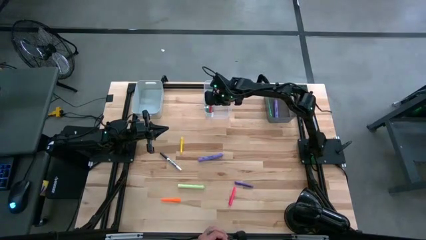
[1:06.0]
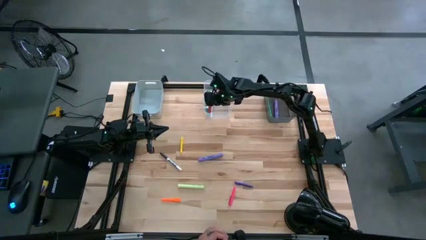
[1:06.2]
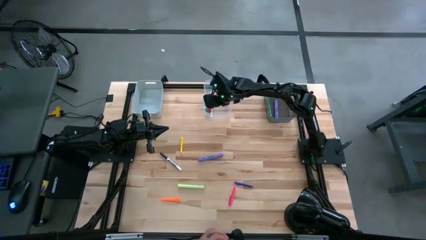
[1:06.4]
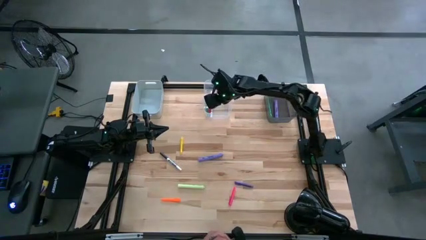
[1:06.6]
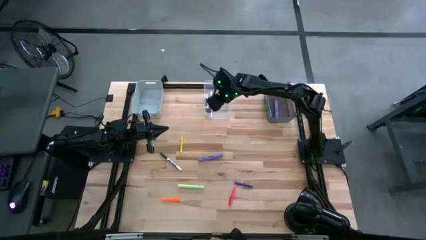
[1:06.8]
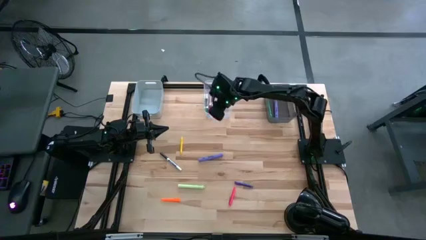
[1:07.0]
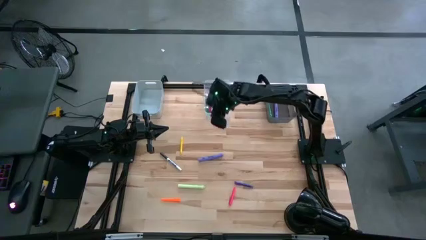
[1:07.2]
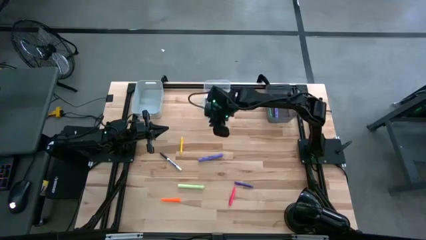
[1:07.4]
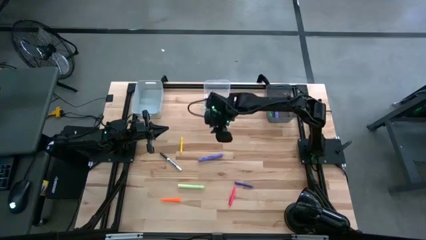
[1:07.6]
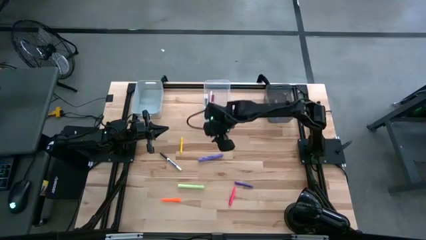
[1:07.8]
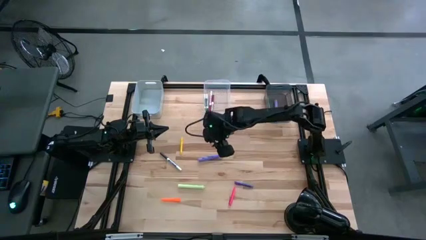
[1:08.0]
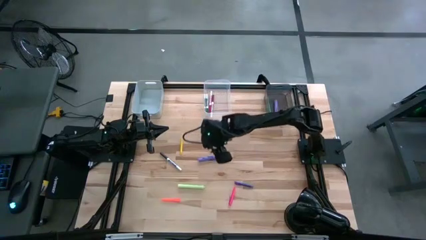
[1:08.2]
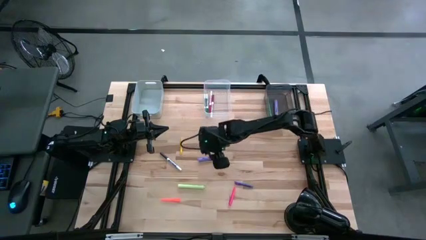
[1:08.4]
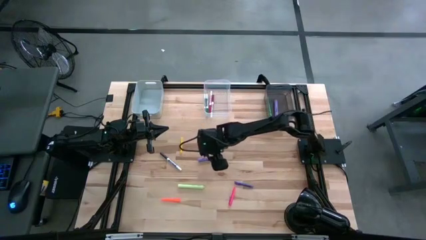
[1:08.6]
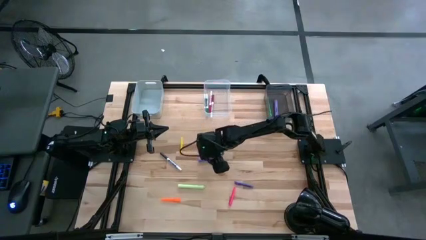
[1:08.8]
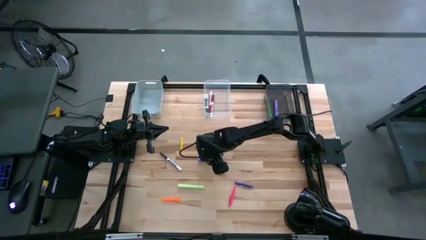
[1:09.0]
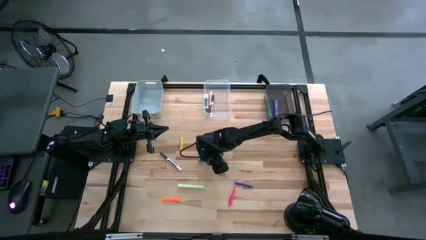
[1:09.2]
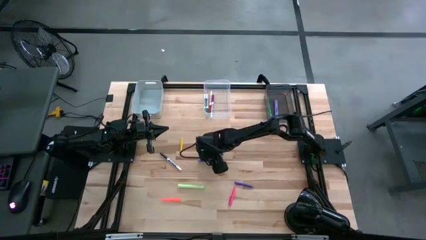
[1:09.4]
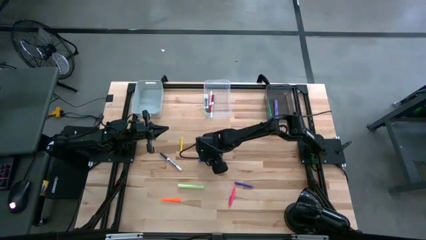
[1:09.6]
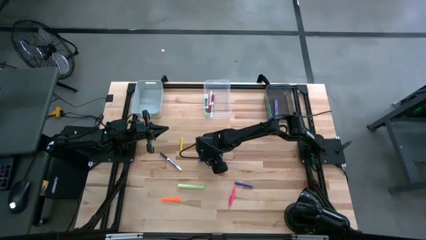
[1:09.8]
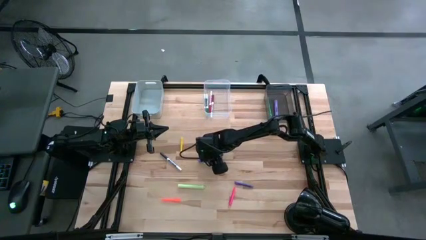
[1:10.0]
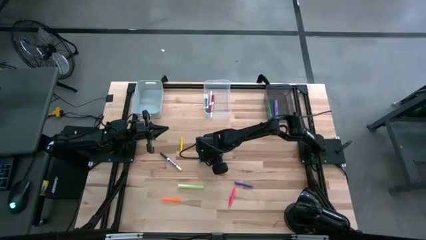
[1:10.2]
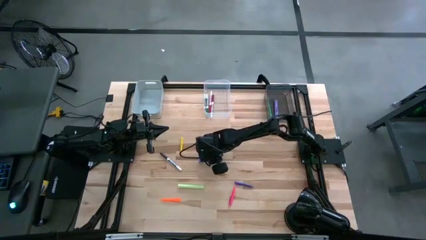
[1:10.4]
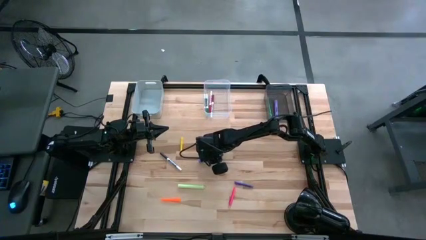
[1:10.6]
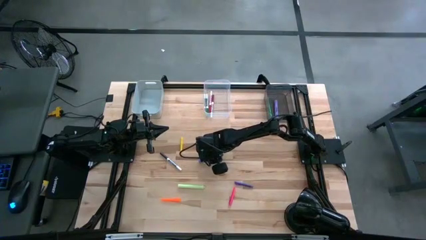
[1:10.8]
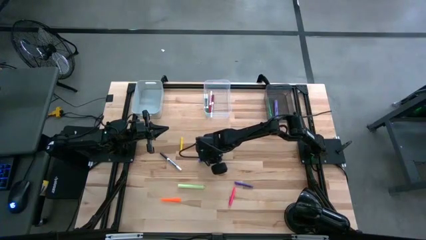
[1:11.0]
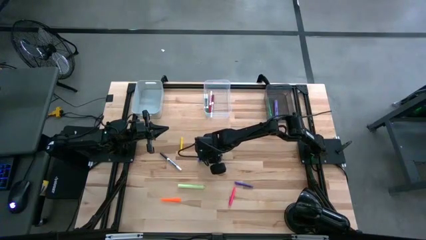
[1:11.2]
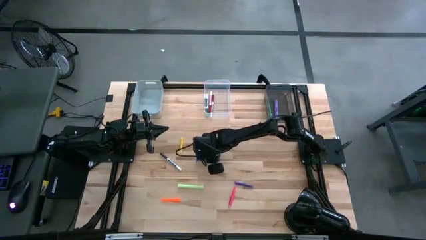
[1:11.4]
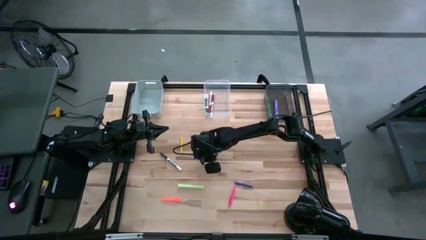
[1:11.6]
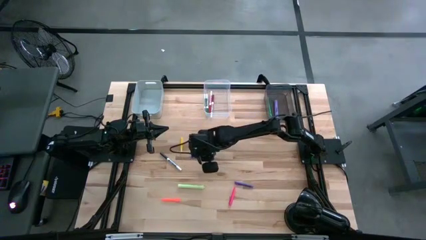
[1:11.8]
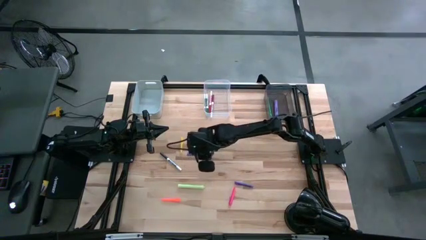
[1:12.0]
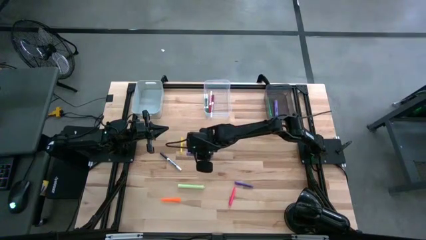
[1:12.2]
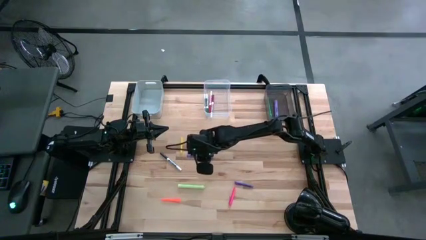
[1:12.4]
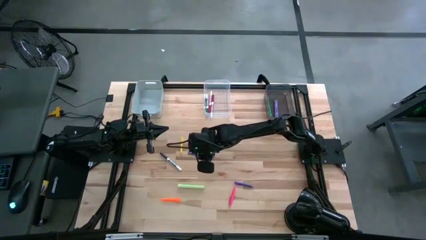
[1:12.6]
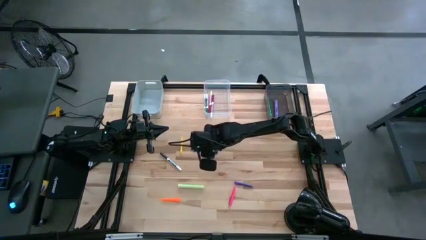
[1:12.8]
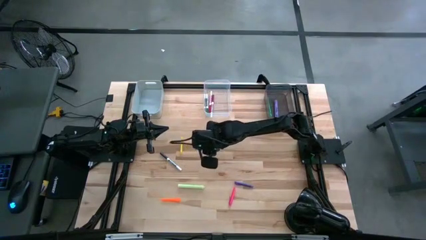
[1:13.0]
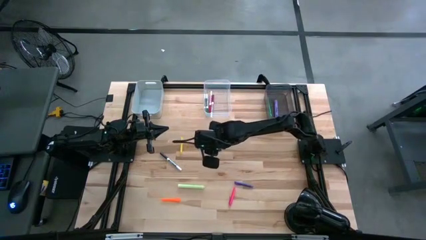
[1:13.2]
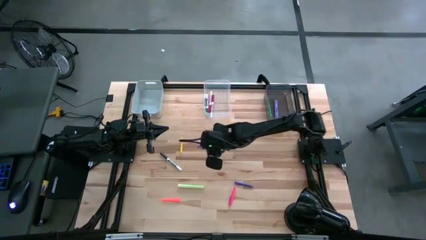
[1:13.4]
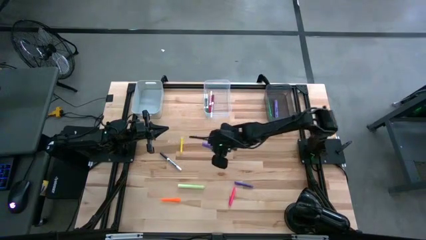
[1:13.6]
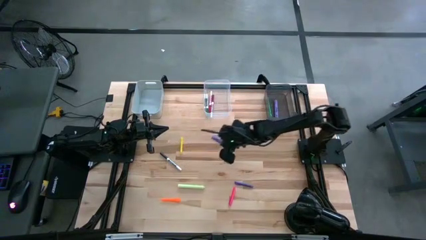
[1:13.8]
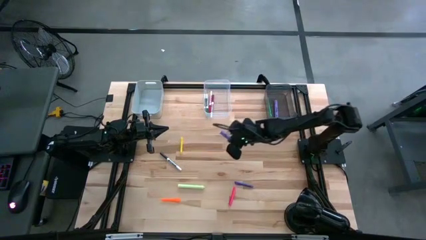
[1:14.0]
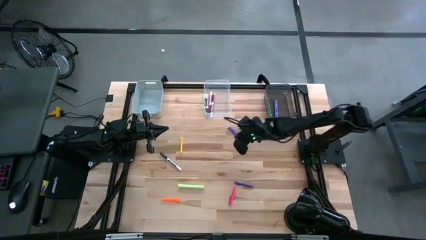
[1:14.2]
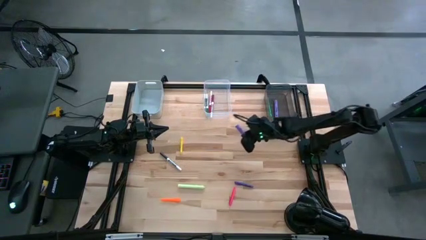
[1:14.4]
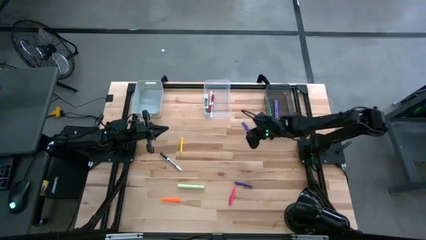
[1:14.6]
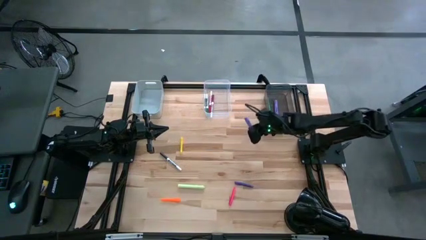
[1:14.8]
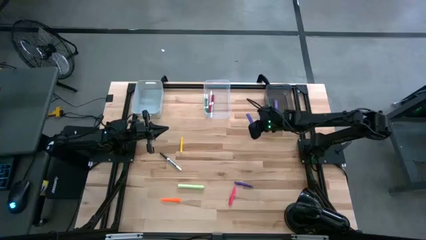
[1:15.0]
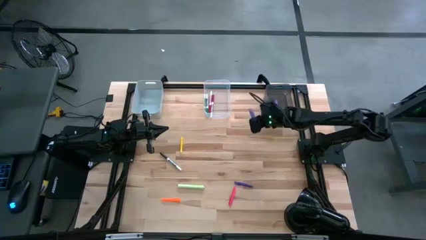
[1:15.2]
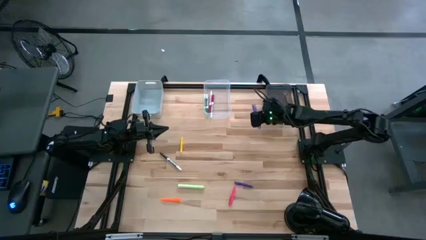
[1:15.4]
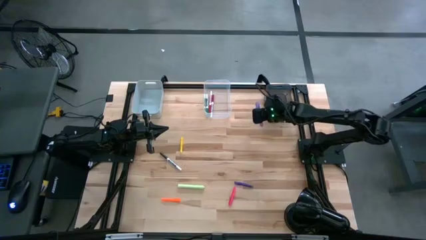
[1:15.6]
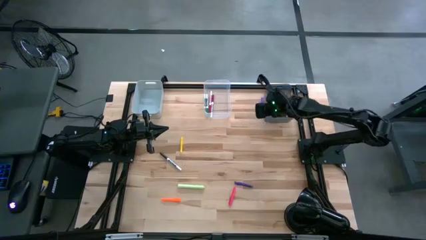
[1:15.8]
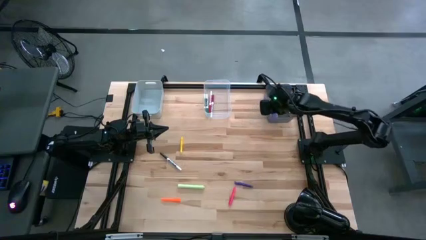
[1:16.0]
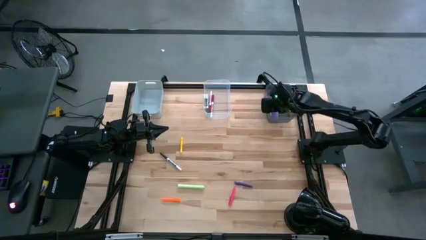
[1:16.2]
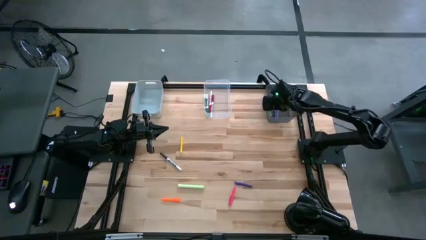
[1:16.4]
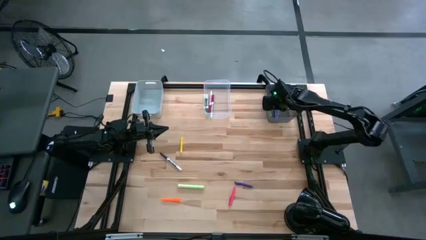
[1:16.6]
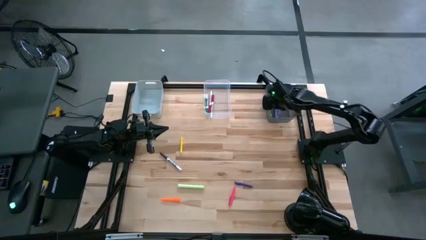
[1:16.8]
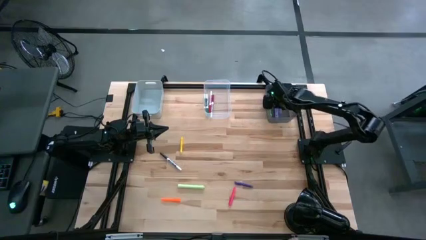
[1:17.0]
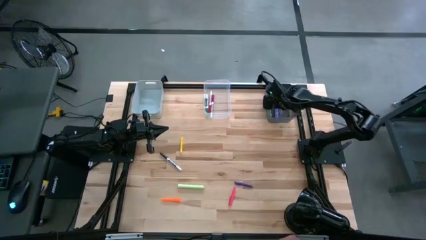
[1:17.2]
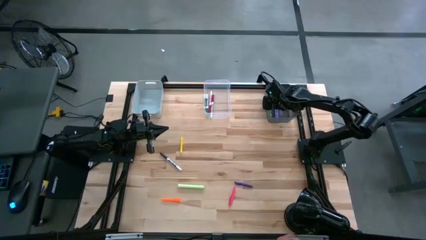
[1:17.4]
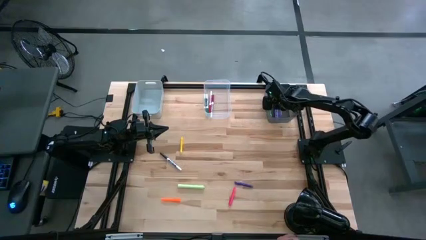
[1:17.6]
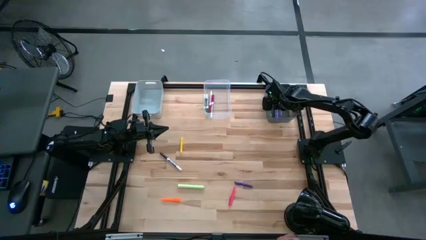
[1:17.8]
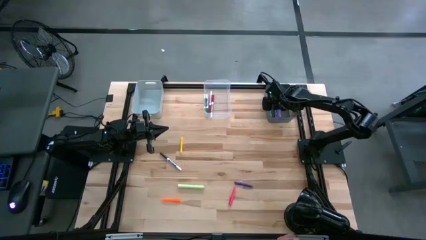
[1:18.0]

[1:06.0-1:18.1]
Task: Pick & Place Markers
Put the purple highlighter pen into the black bin
